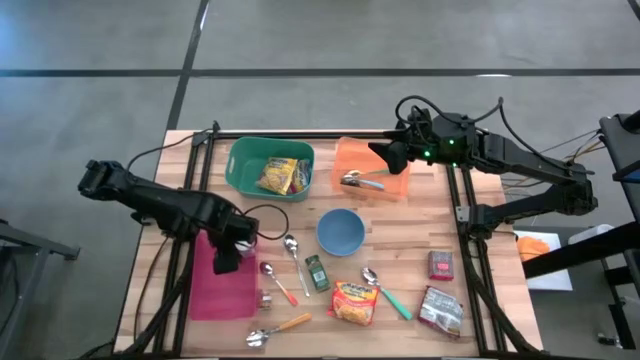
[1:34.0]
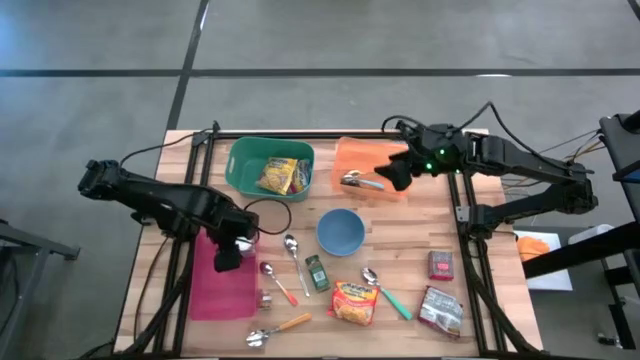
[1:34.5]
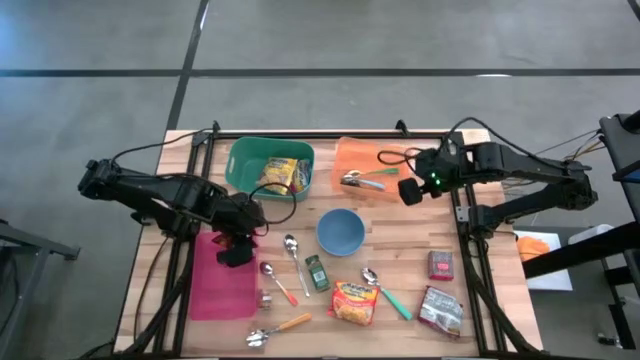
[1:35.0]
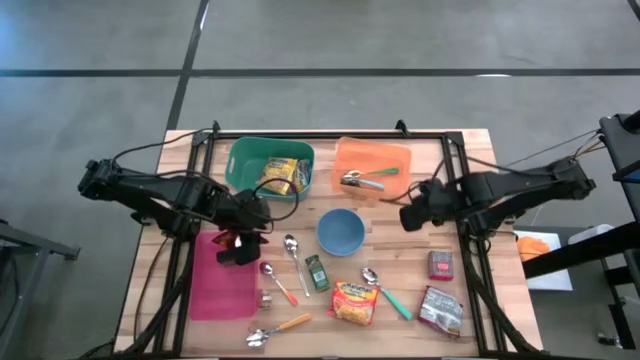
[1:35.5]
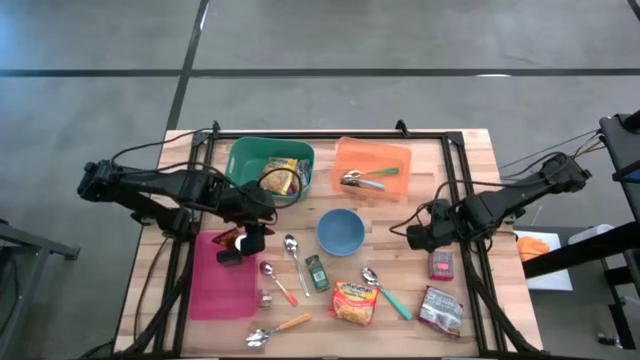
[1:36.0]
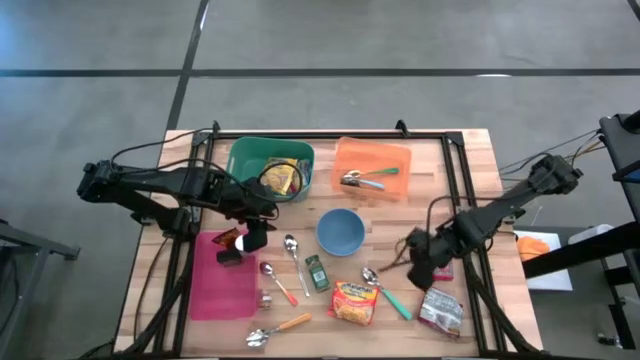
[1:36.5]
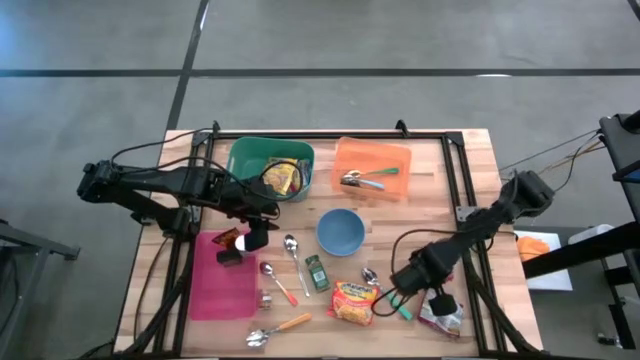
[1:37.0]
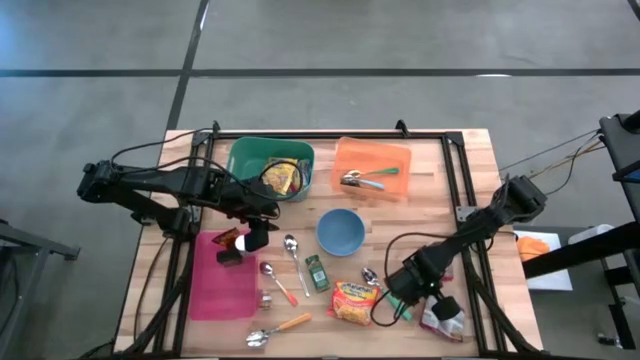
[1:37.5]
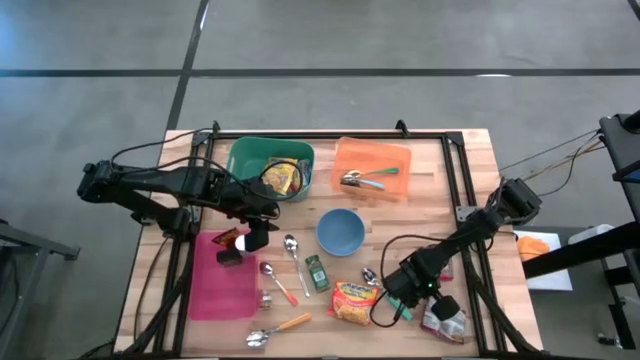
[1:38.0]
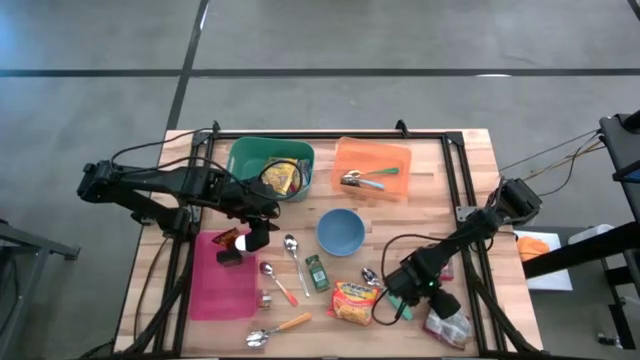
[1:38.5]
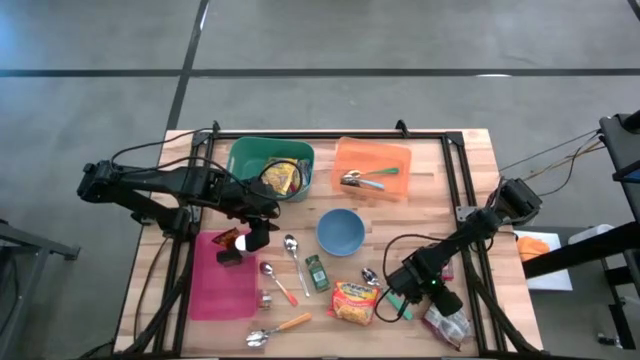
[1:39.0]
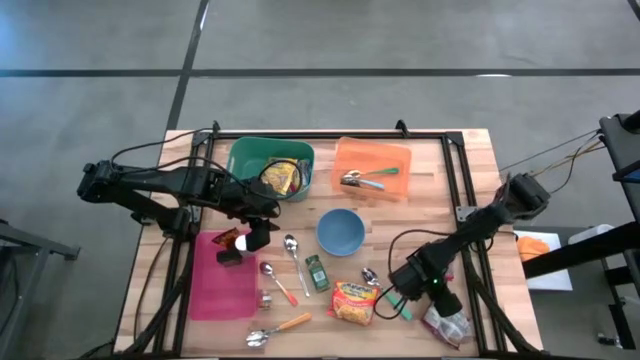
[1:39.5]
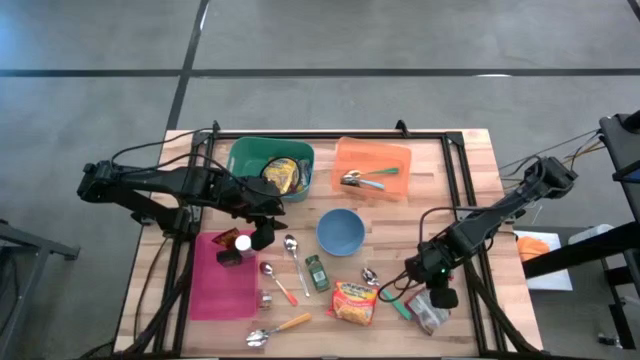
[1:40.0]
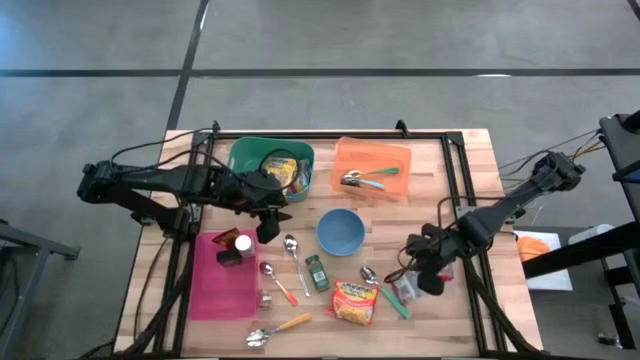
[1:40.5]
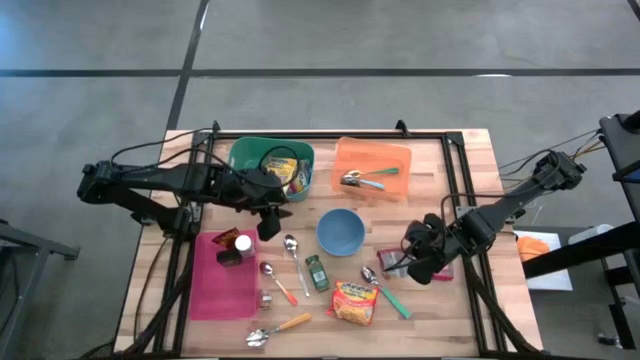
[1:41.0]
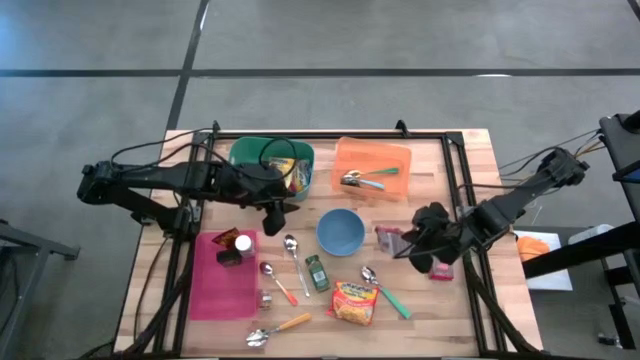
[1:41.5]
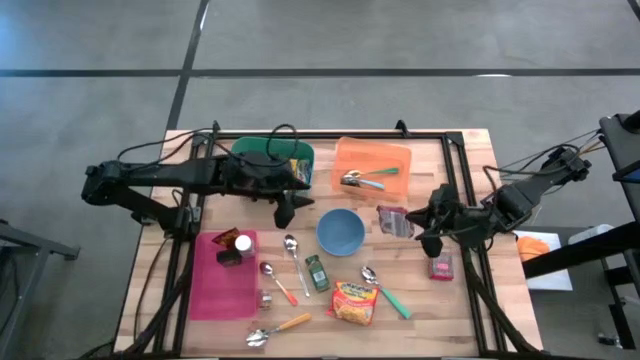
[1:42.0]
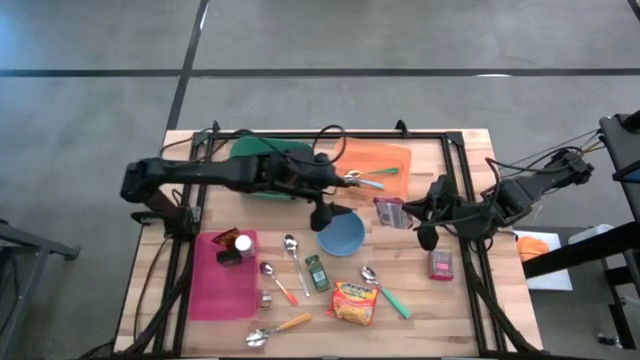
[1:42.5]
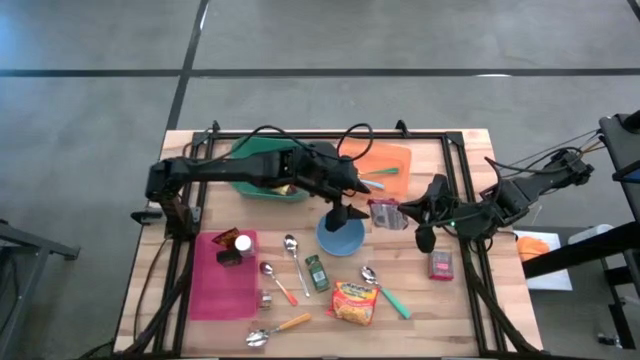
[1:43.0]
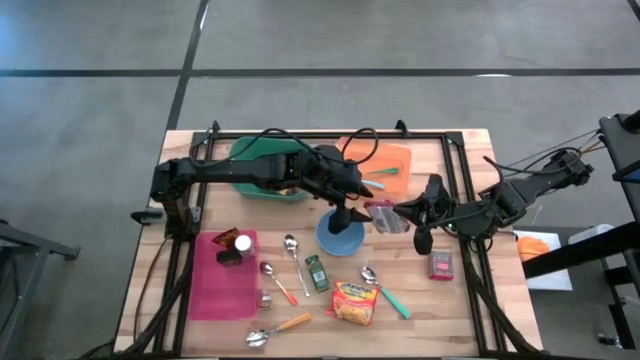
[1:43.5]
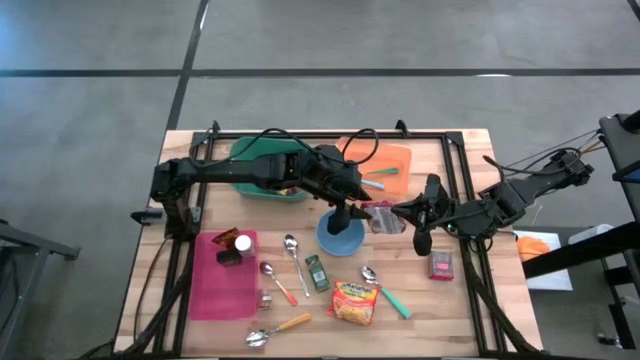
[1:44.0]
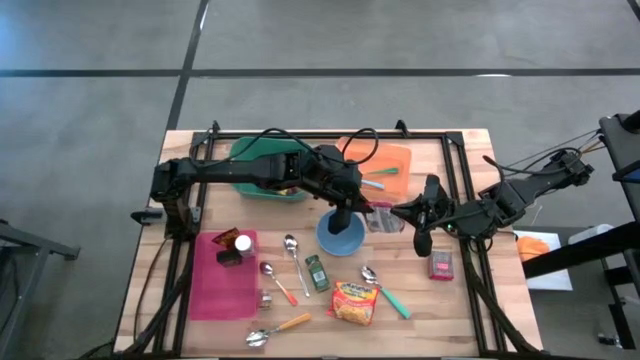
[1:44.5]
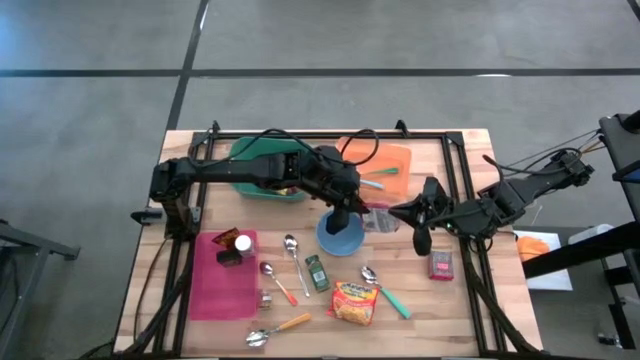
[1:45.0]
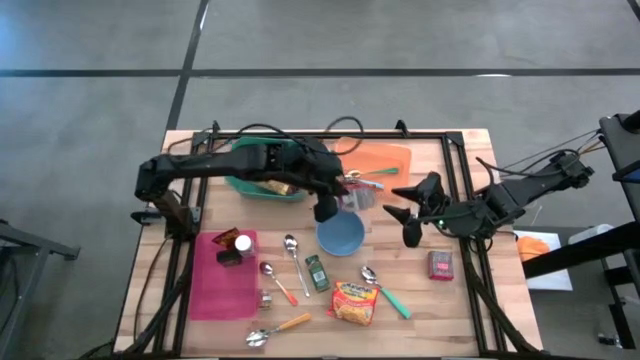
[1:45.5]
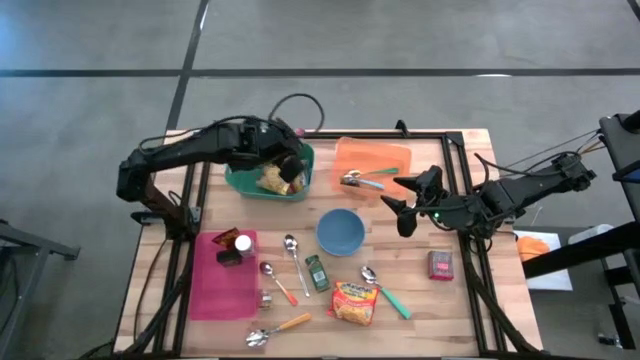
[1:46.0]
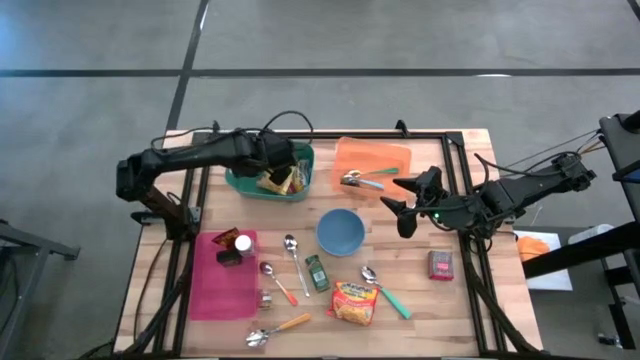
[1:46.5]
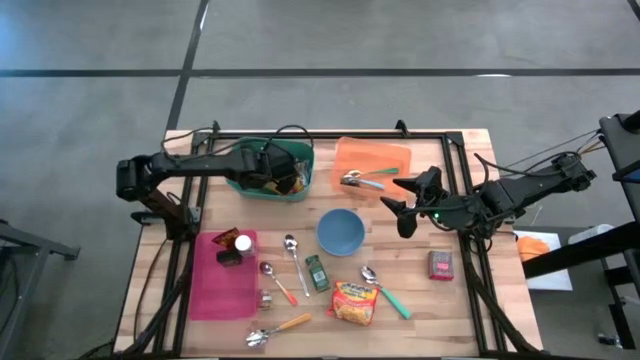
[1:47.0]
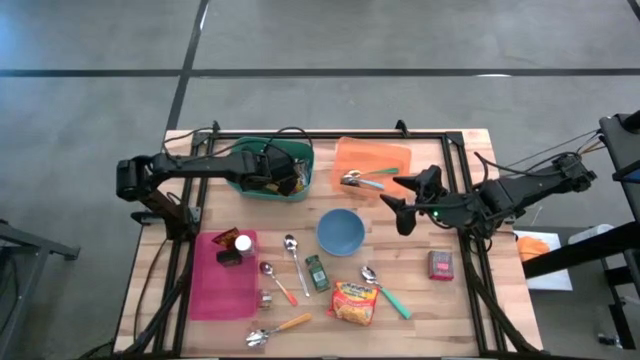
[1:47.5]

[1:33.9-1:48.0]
Put the red noodle pack into the green bin

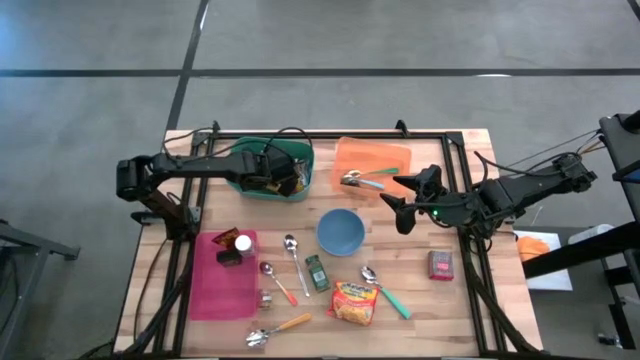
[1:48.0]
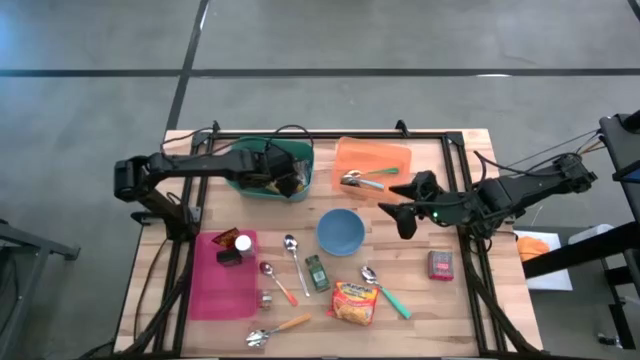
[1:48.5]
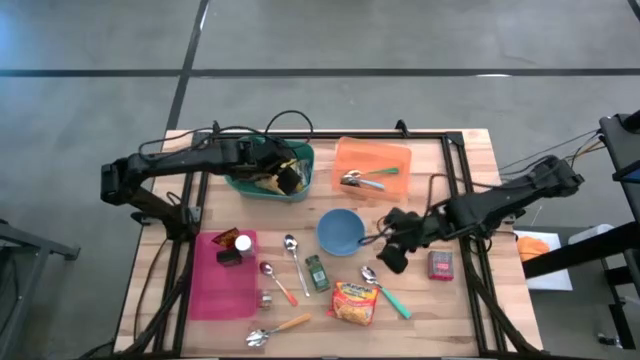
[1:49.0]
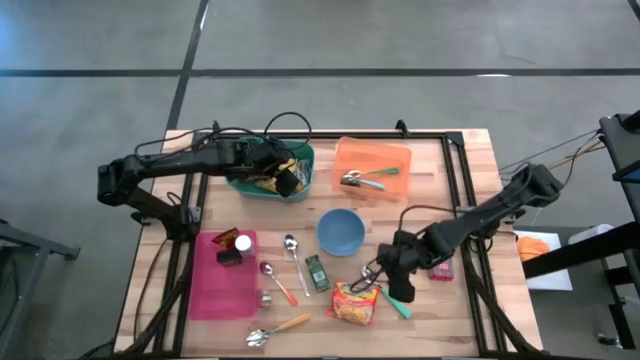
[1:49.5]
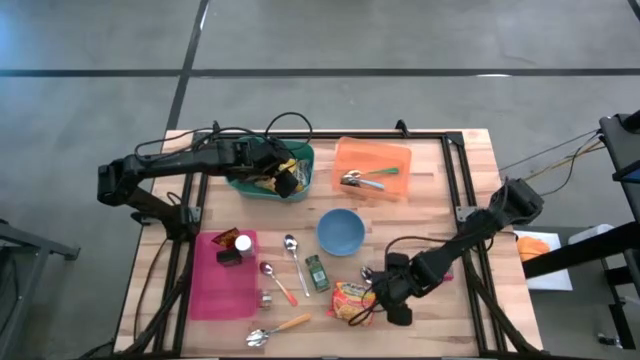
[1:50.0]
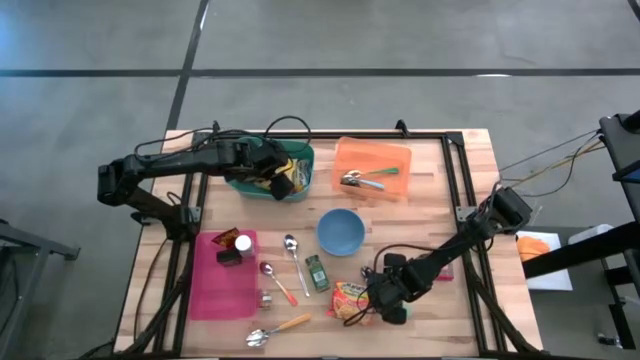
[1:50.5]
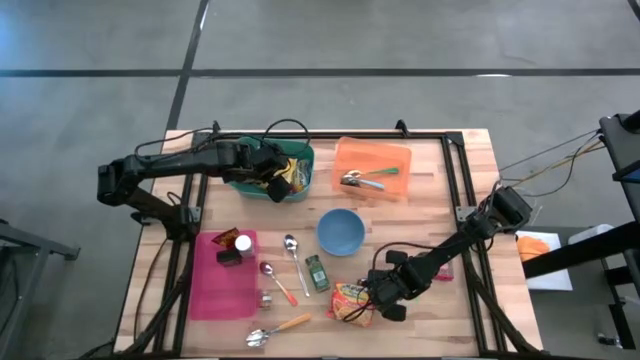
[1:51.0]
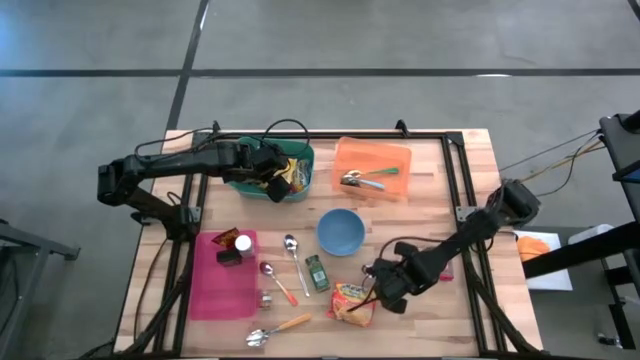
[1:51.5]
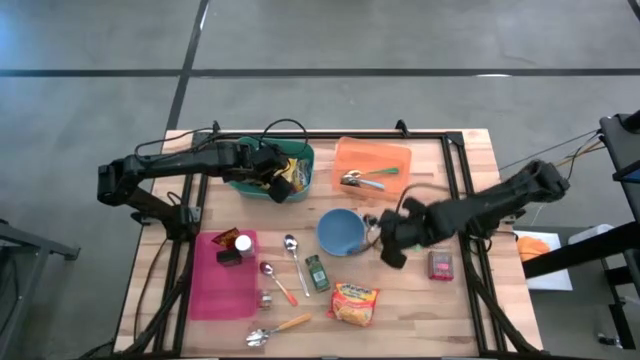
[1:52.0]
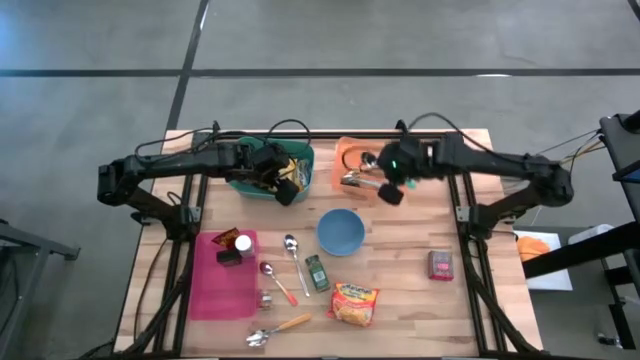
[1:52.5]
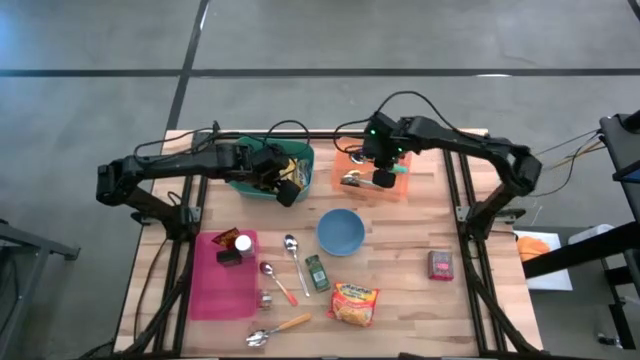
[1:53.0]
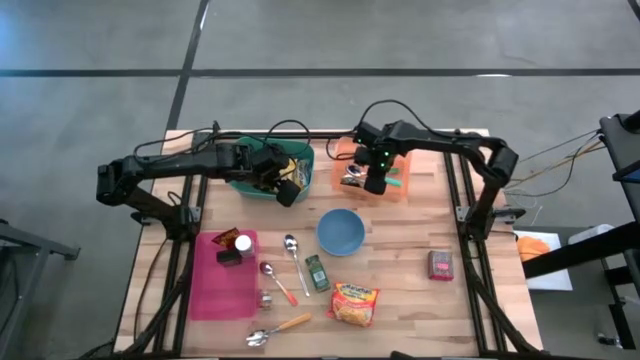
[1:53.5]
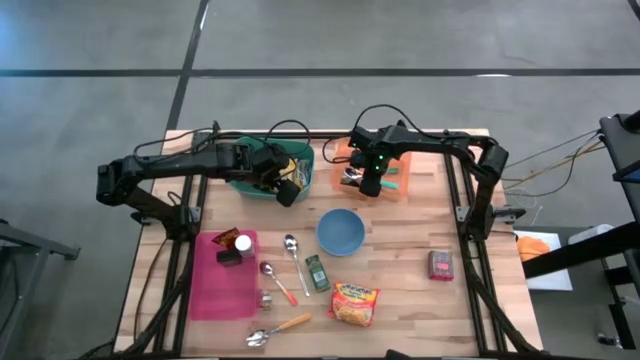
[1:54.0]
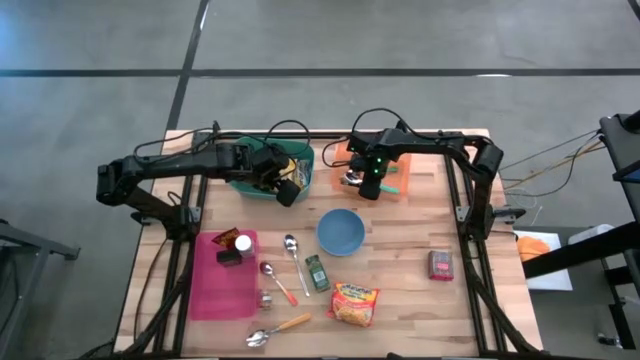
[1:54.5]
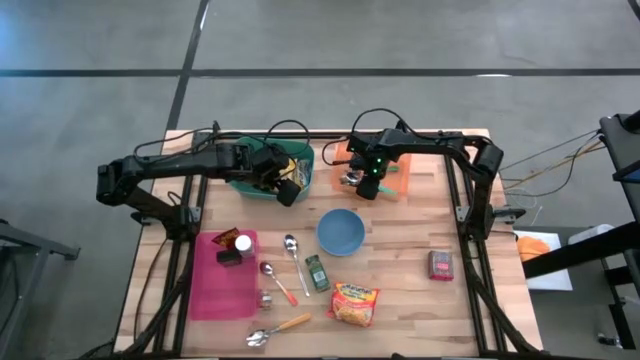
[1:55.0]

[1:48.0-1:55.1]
Put the light green spoon into the orange bin
